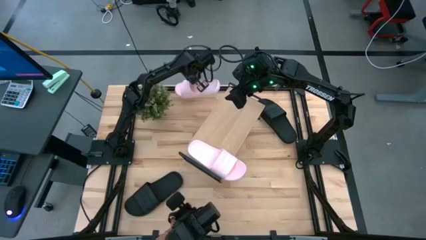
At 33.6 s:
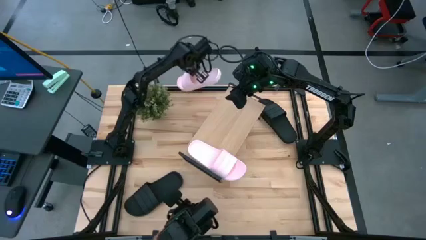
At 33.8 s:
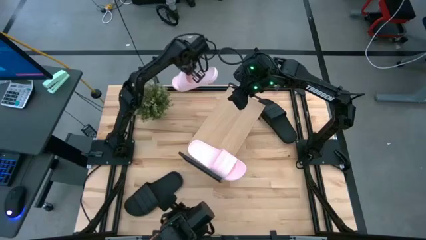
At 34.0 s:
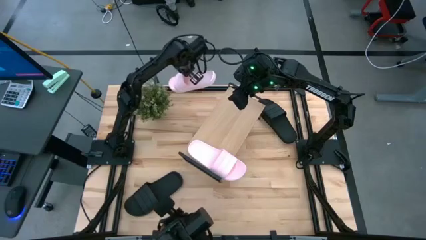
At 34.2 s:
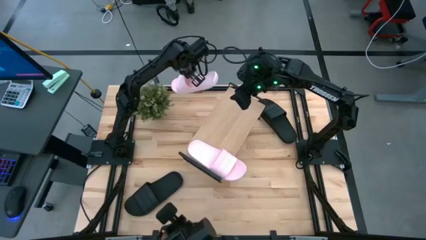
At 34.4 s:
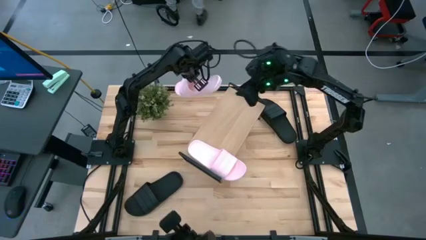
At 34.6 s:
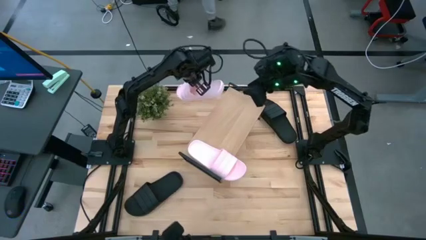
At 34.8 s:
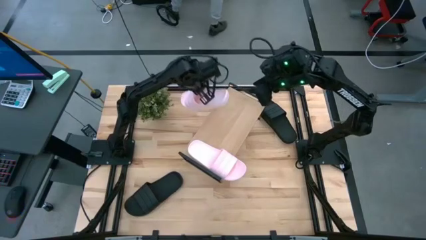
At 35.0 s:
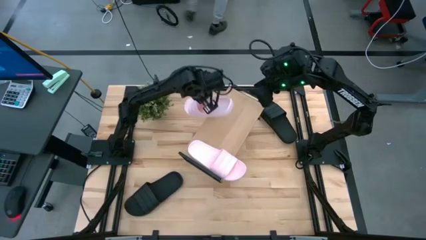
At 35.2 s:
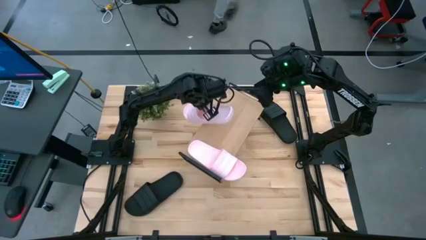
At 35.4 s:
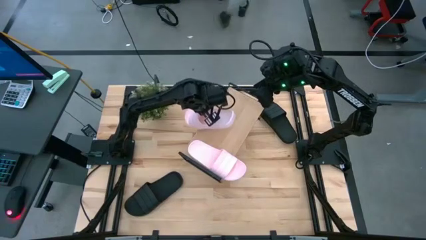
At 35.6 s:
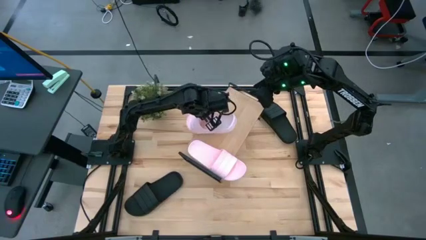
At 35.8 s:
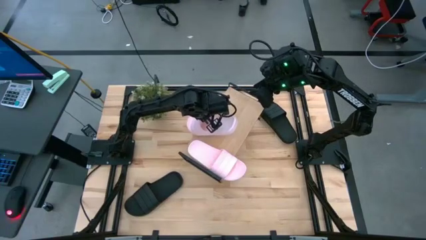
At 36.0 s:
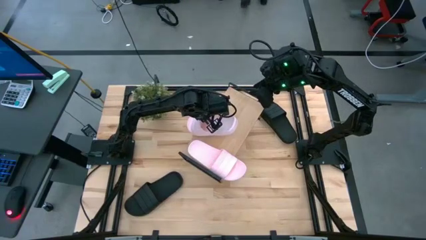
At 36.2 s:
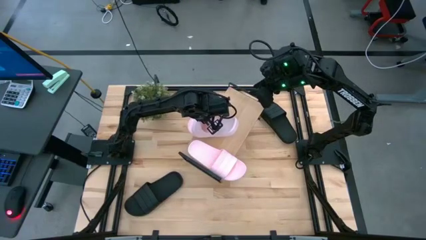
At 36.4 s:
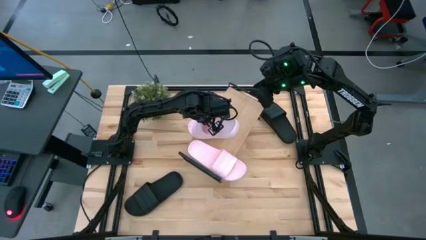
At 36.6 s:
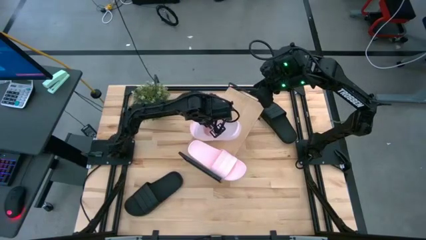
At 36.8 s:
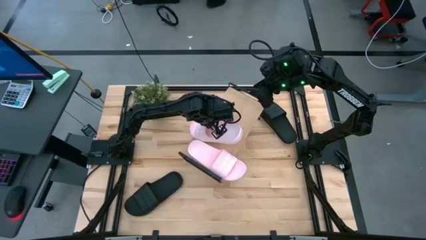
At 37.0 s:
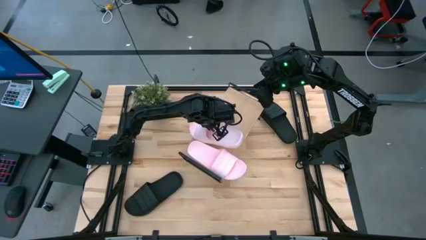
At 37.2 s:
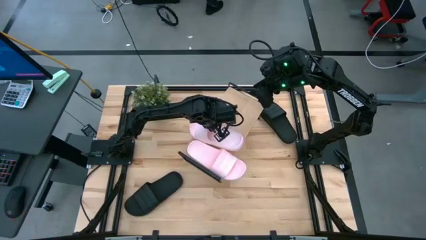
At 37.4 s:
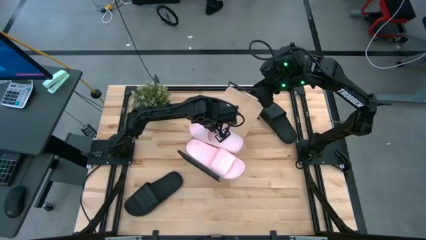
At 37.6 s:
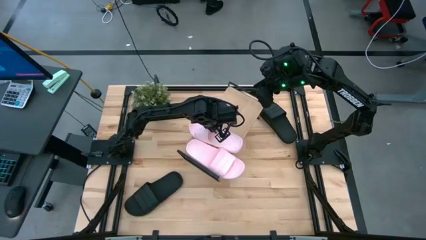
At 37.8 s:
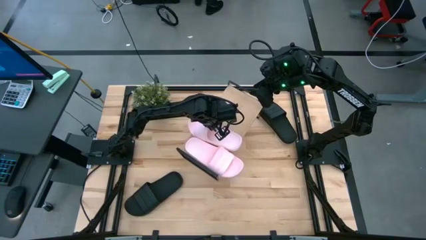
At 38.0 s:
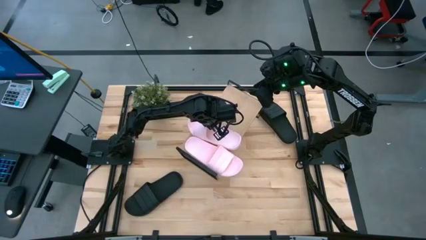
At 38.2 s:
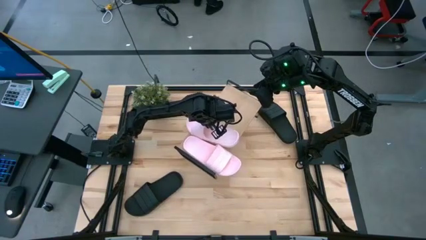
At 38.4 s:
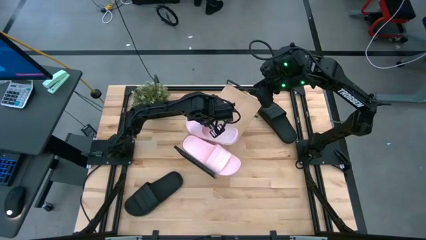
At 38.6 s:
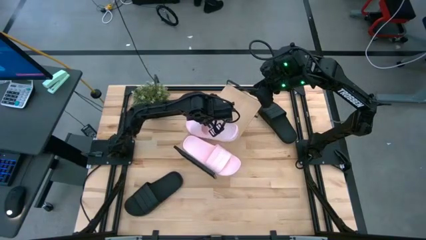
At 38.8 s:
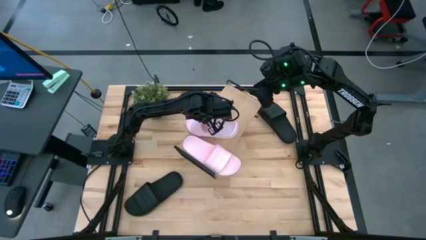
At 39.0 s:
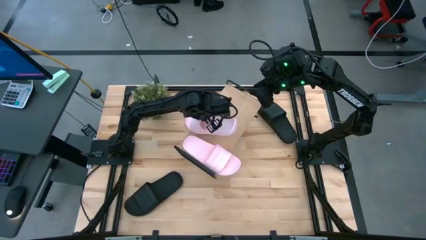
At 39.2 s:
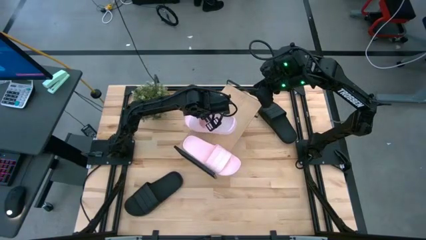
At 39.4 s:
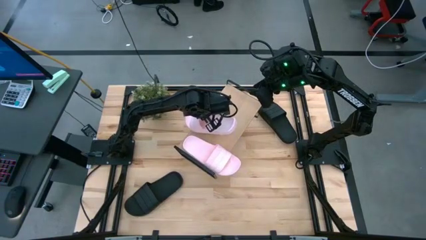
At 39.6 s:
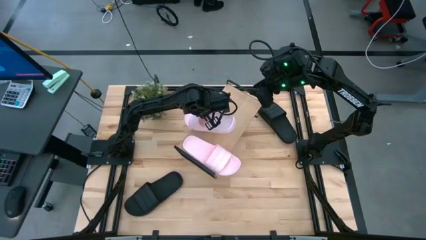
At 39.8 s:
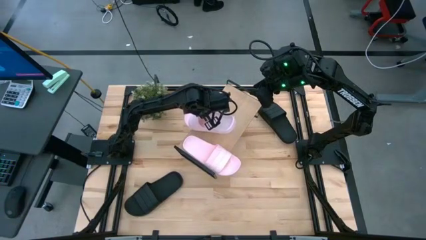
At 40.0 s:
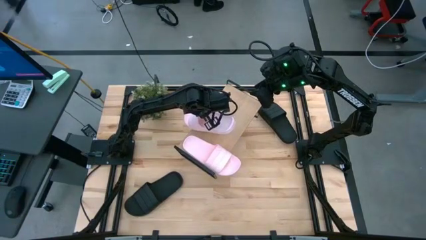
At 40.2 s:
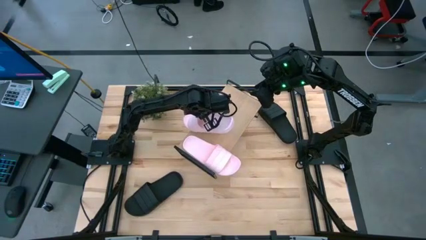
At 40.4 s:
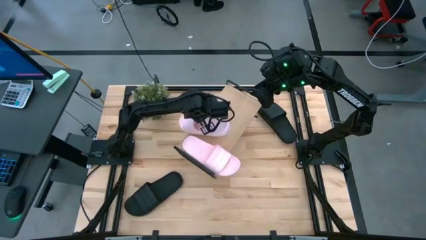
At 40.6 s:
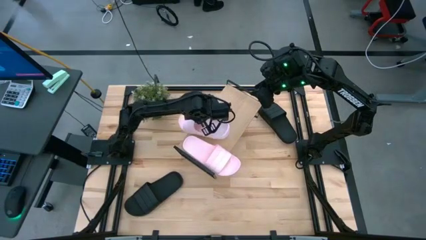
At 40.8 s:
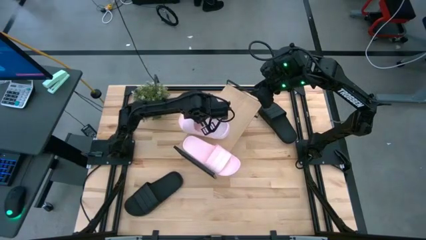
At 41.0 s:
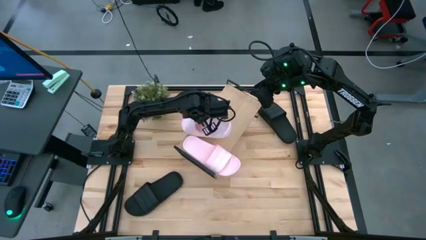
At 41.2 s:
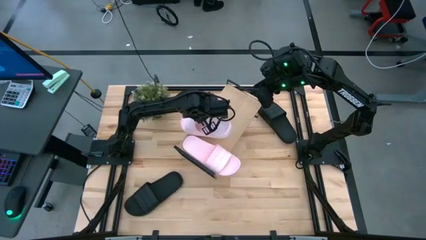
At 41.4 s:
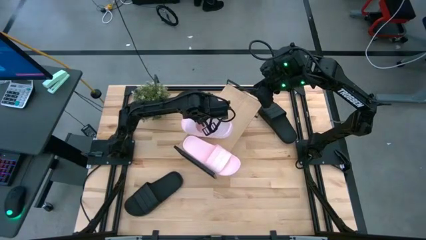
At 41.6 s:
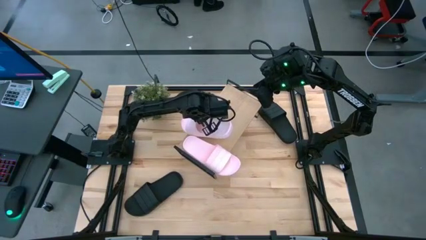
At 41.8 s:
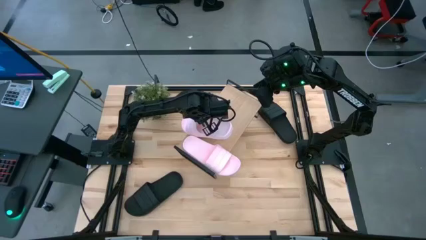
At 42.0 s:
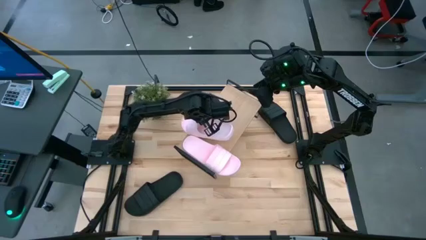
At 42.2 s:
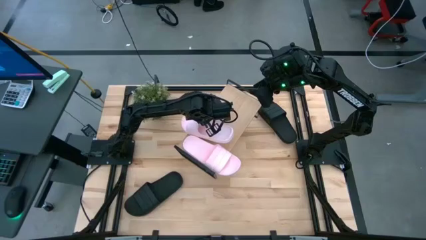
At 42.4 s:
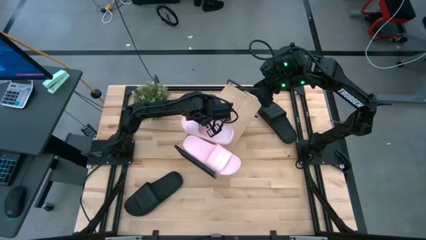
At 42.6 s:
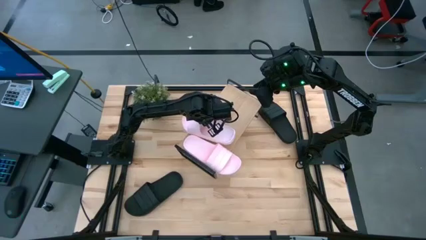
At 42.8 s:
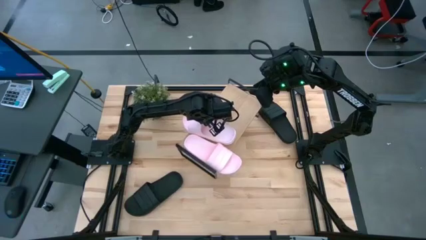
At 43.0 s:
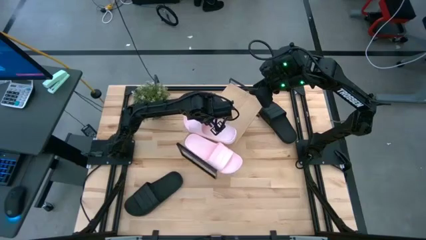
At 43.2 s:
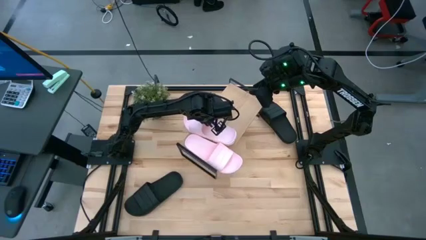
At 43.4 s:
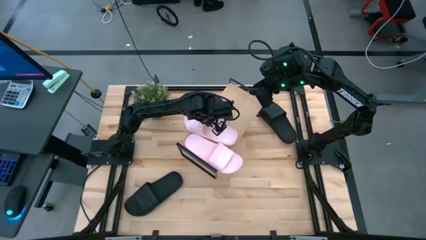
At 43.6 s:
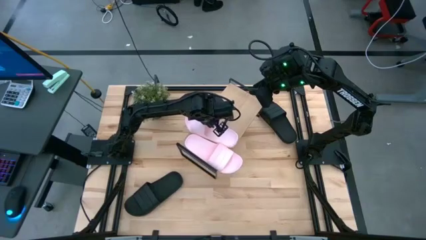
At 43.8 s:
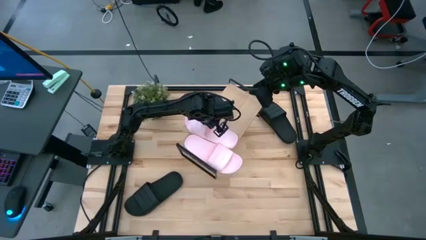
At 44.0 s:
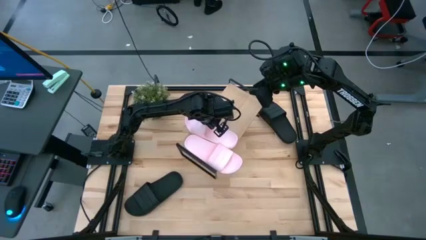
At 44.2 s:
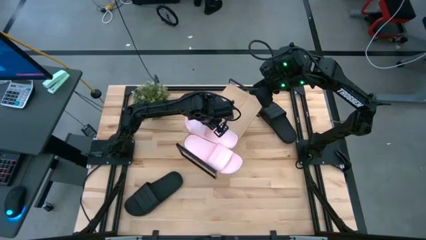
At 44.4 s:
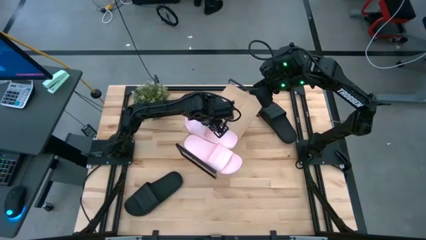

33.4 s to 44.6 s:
Task: Pick and place slides into the shelf
Put the pink slipper on the shelf
